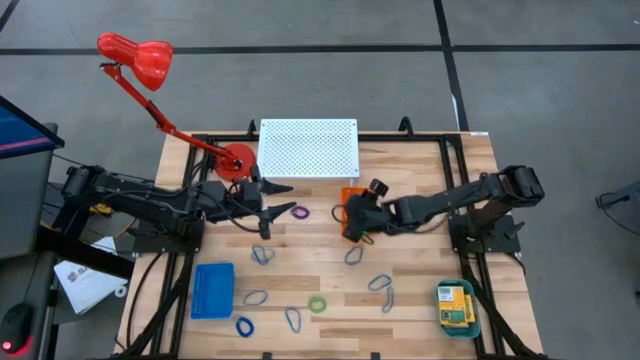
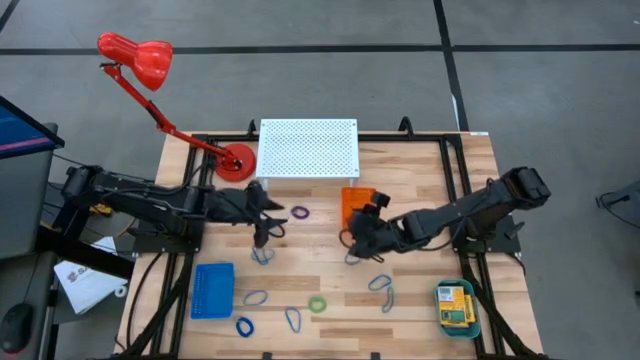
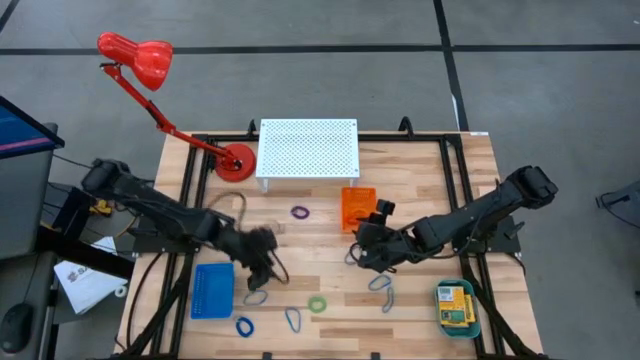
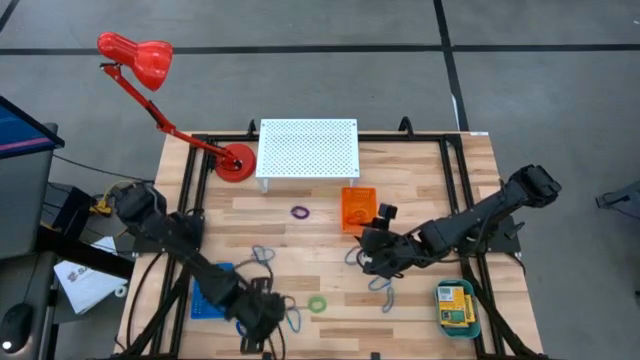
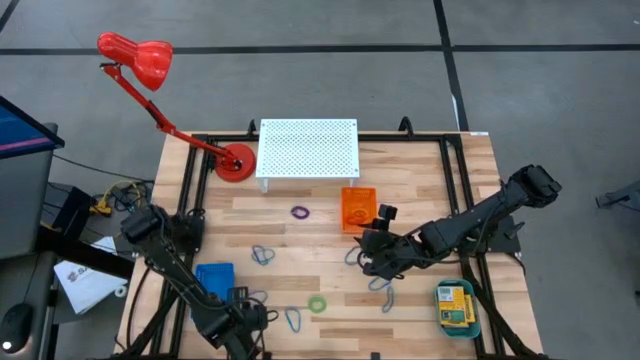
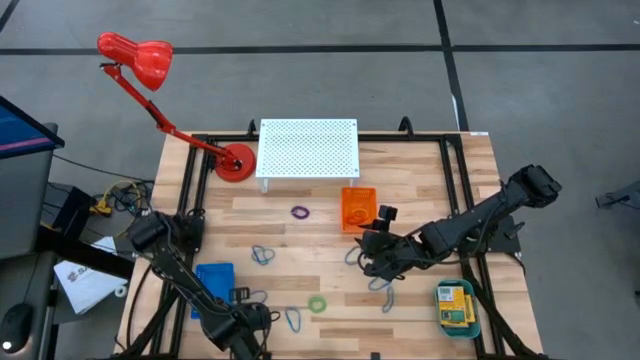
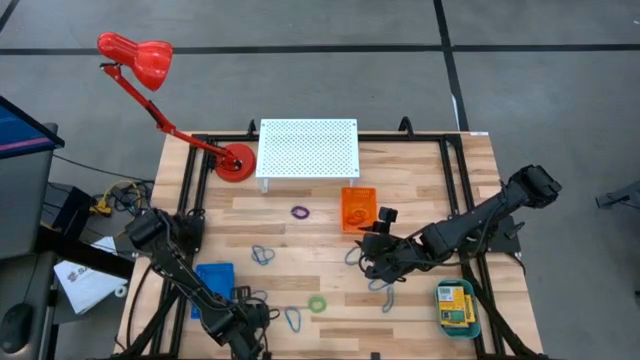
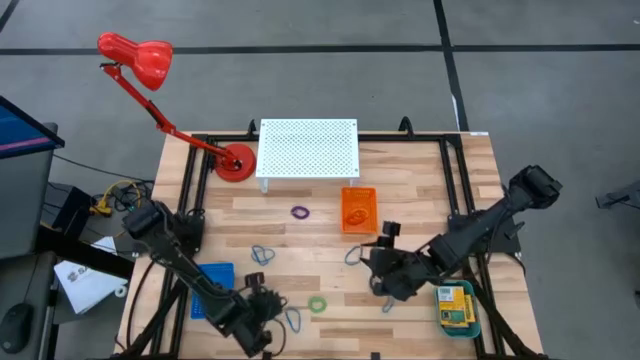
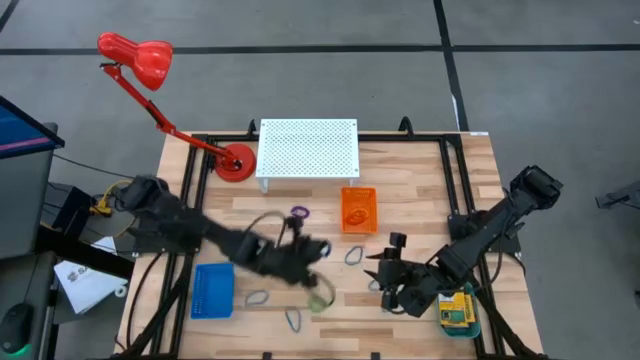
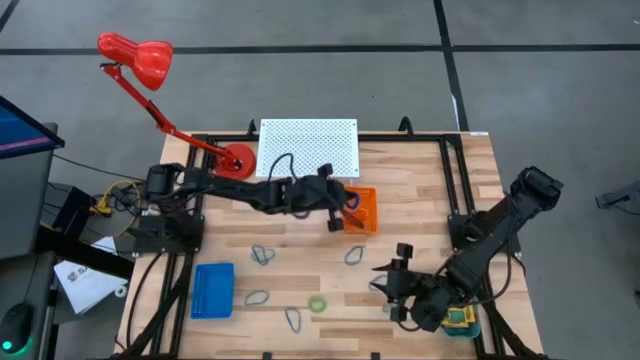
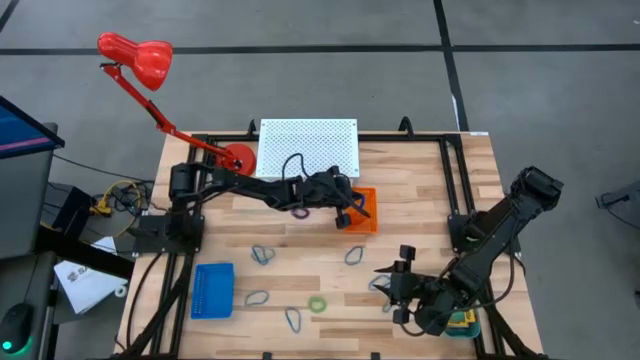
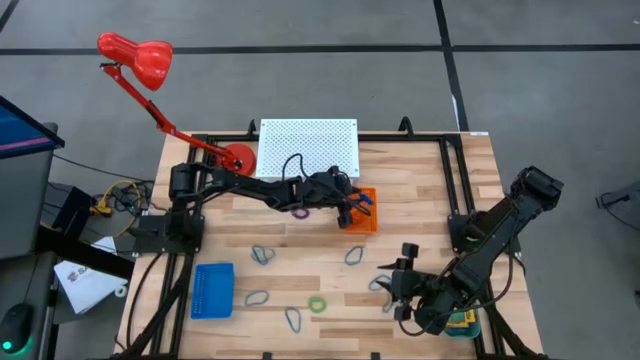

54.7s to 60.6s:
Task: Pick & Place Office Desk Supplies
Put the blue spring keychain into the orange bin

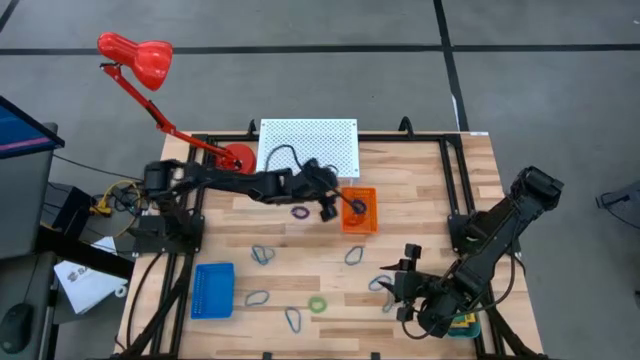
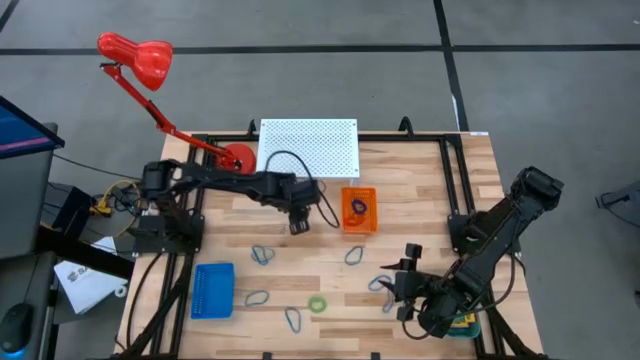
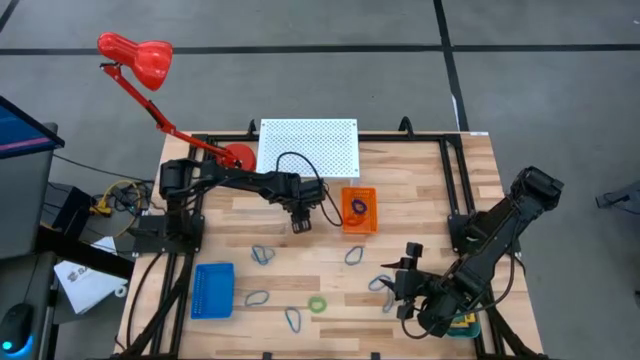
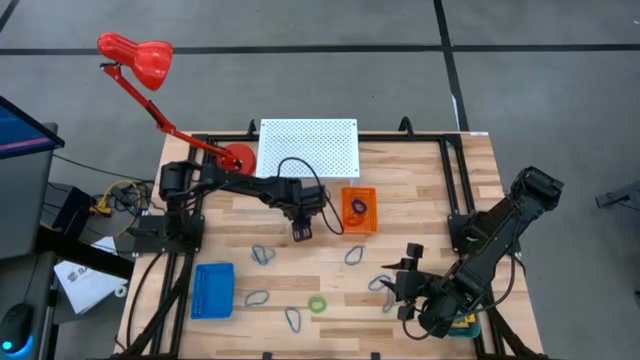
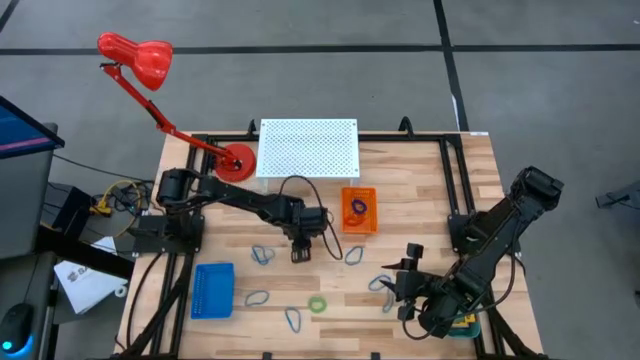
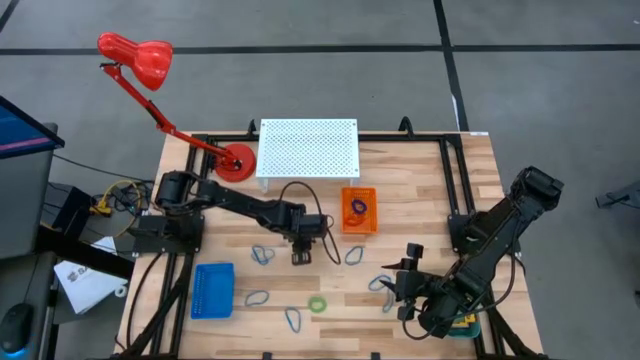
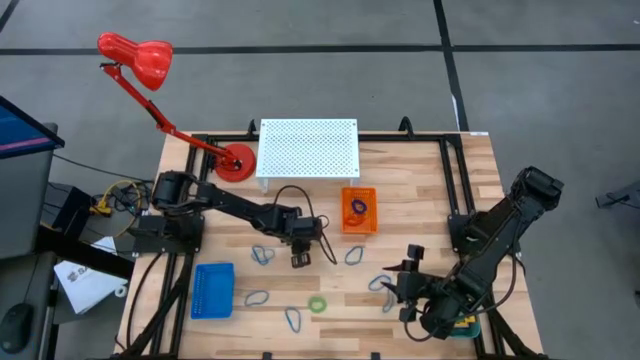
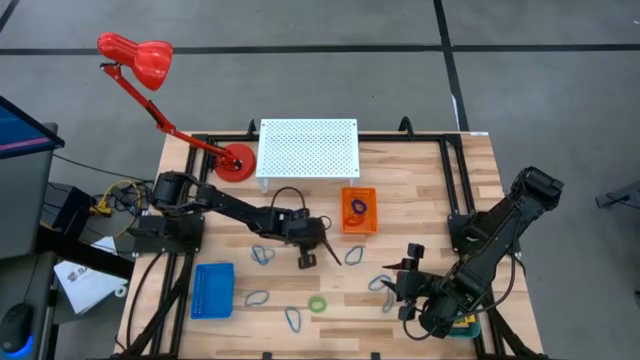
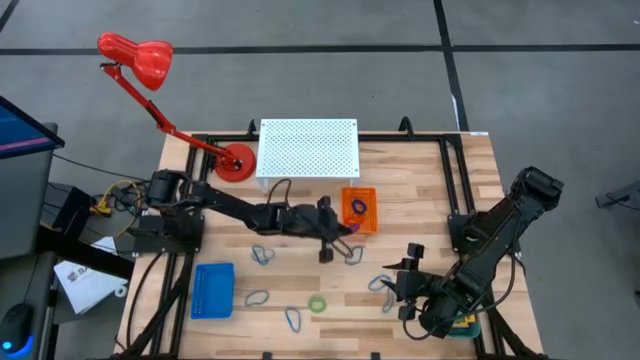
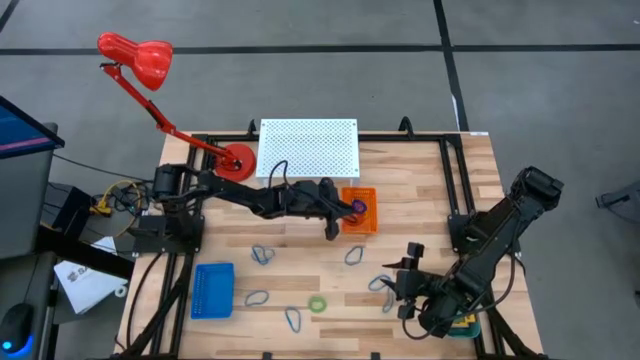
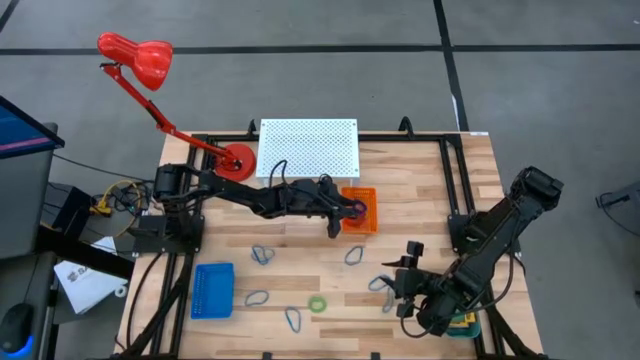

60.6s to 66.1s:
Put the purple spring keychain into the orange bin

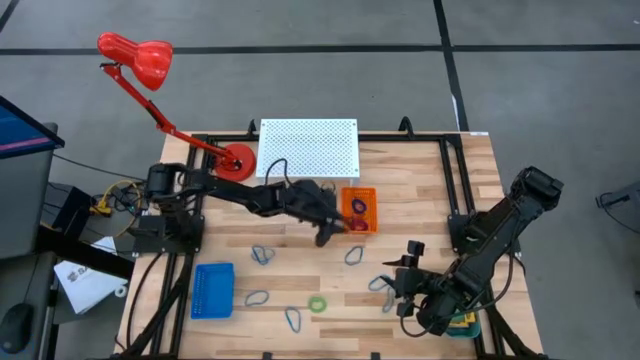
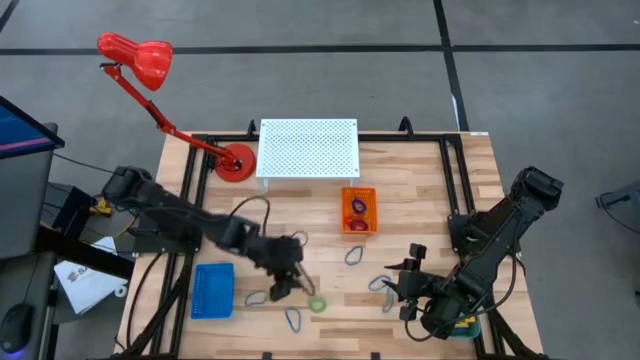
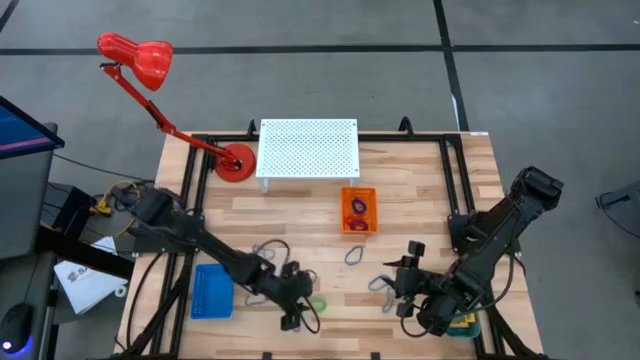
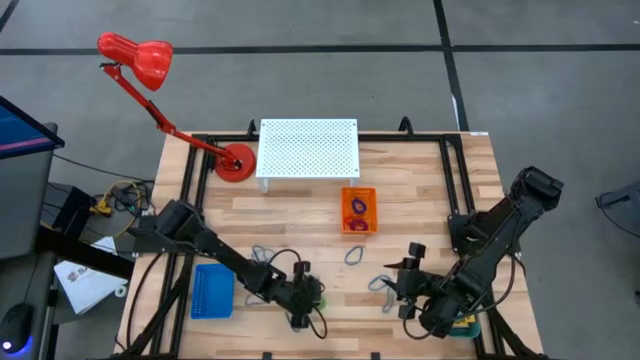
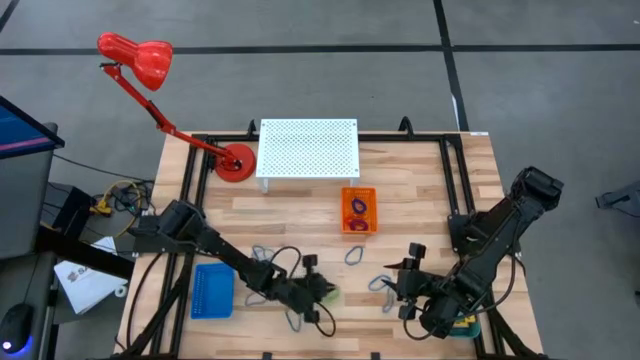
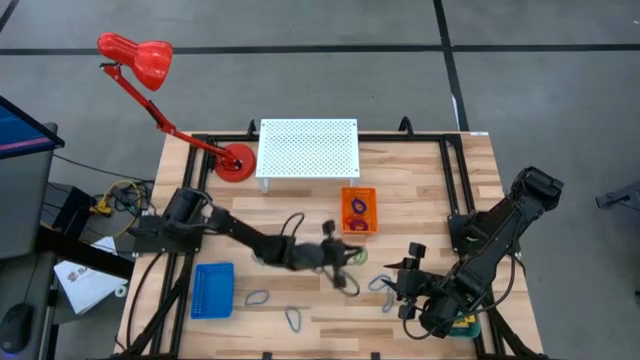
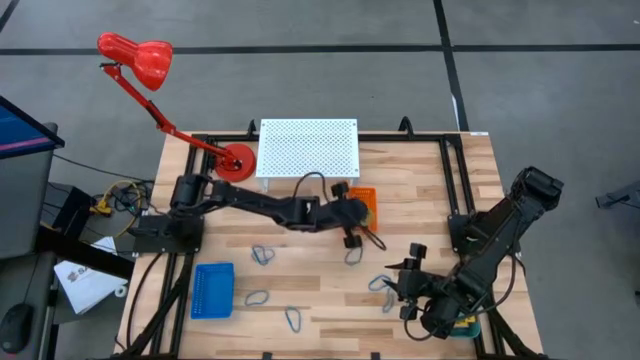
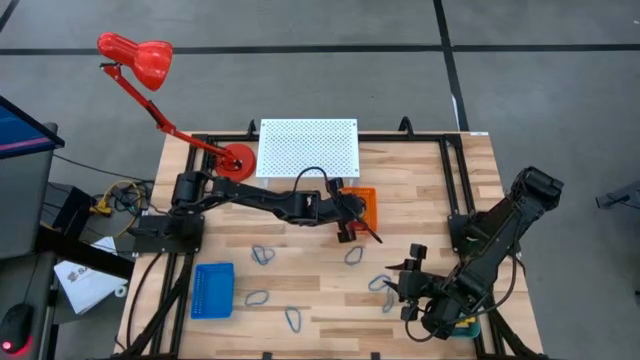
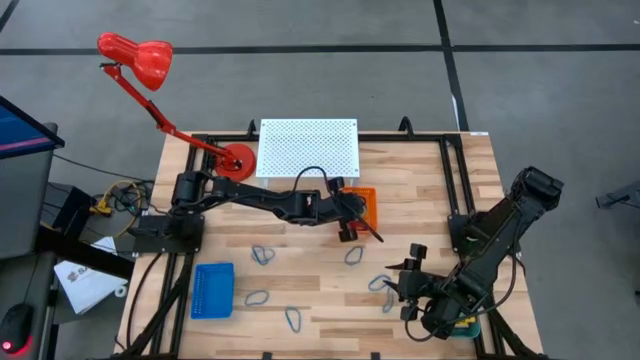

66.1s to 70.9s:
Put the green spring keychain into the orange bin

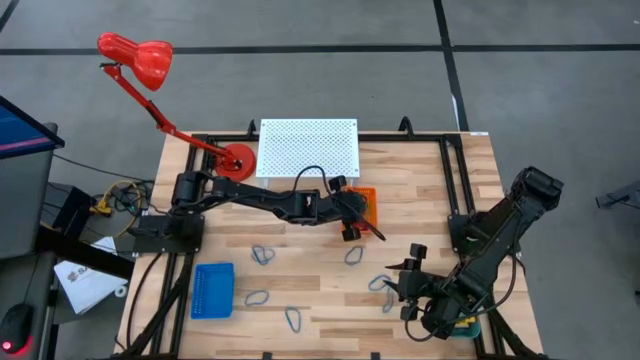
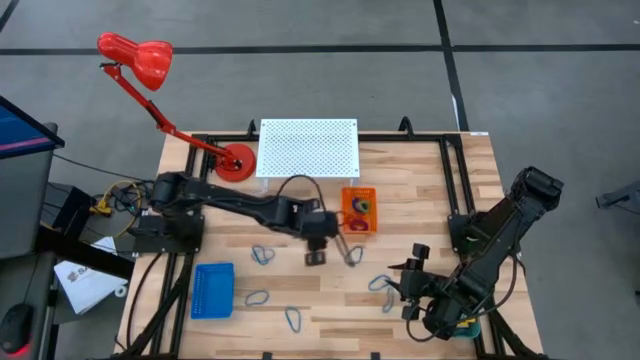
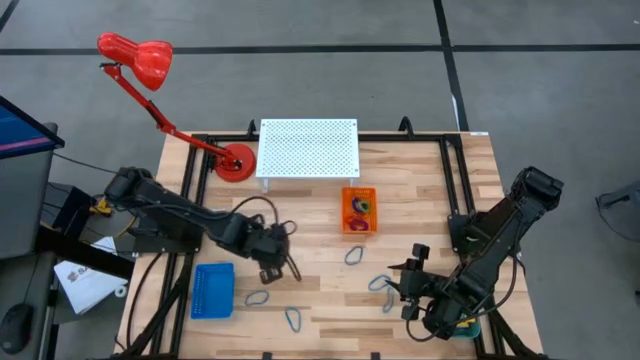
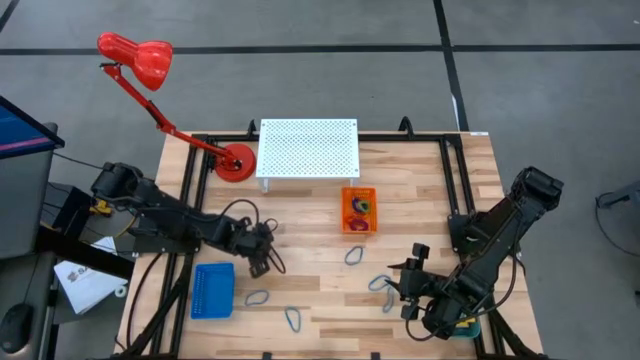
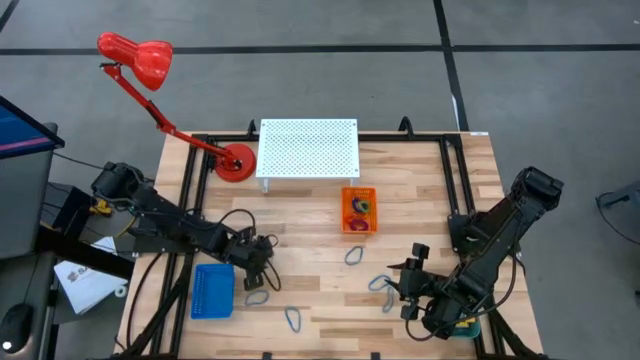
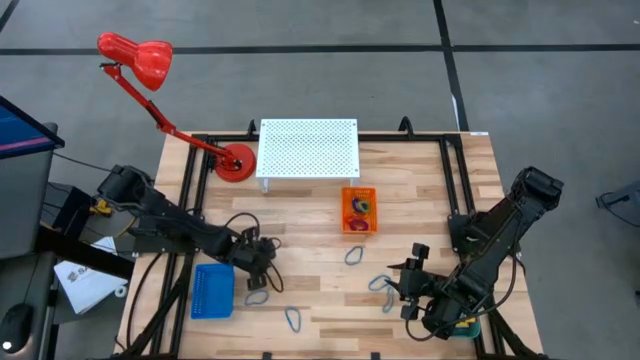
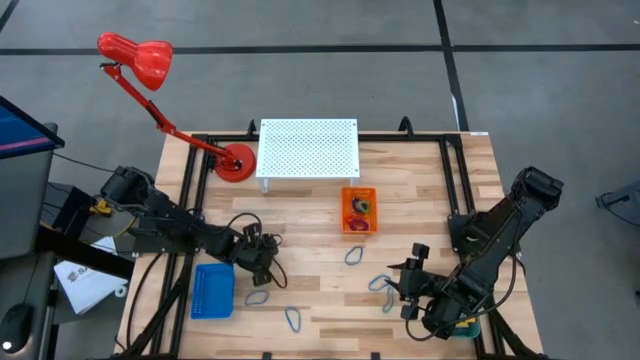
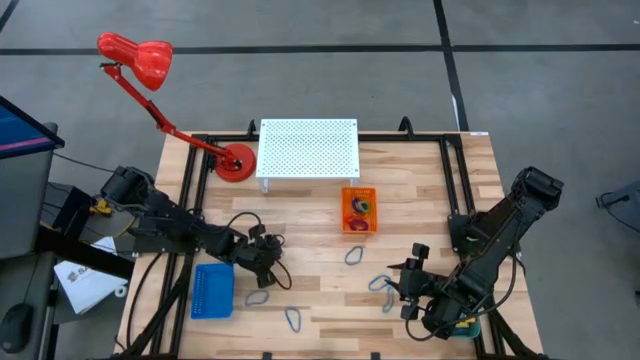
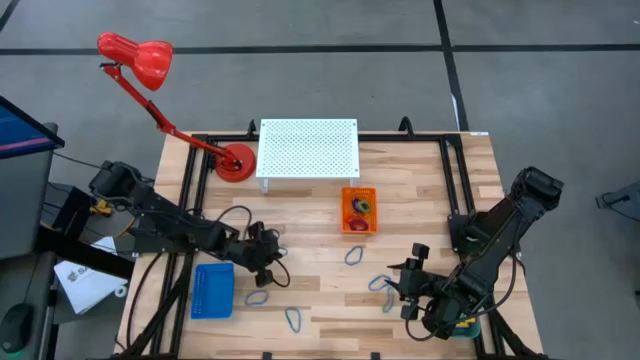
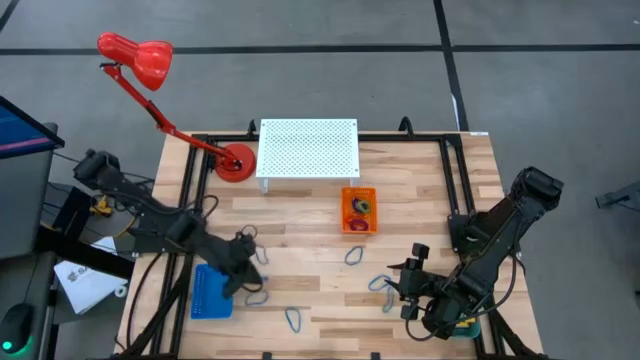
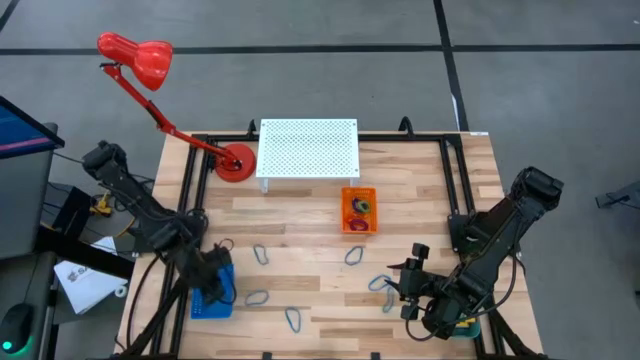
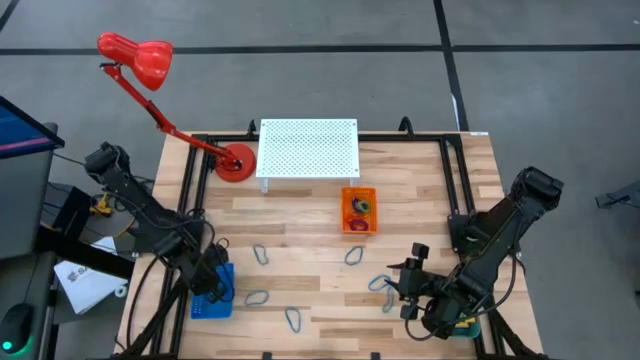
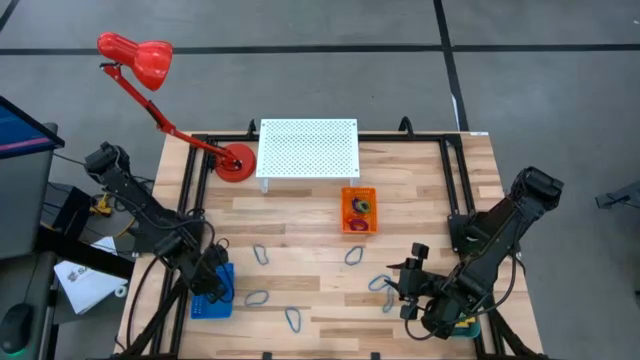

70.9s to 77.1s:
Put the blue rubber band into the blue bin
